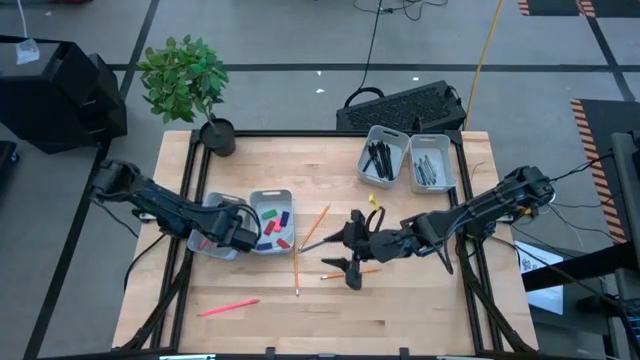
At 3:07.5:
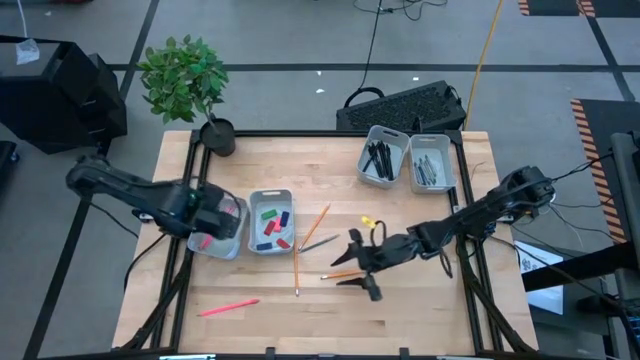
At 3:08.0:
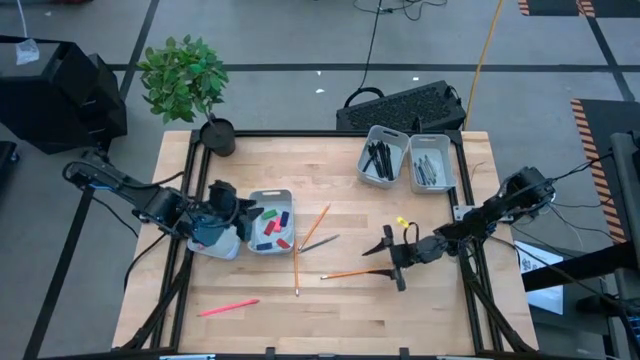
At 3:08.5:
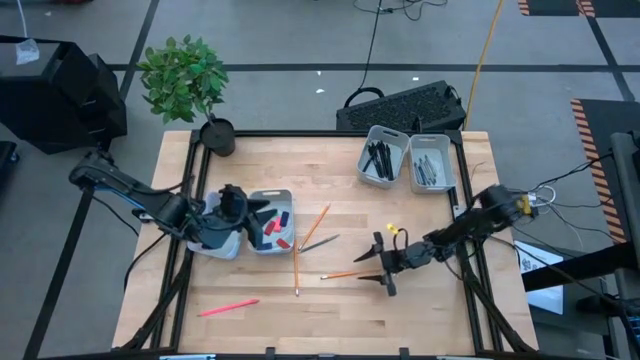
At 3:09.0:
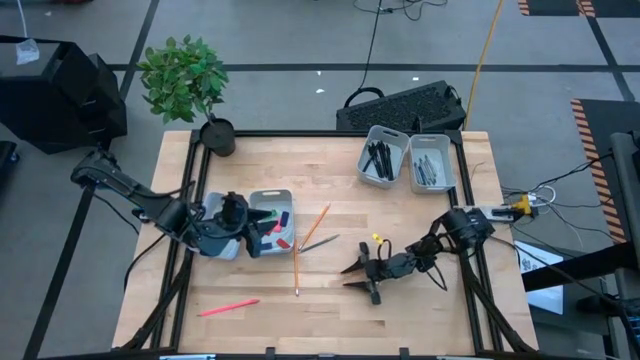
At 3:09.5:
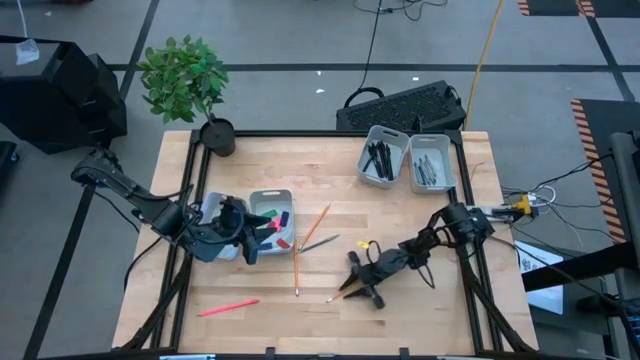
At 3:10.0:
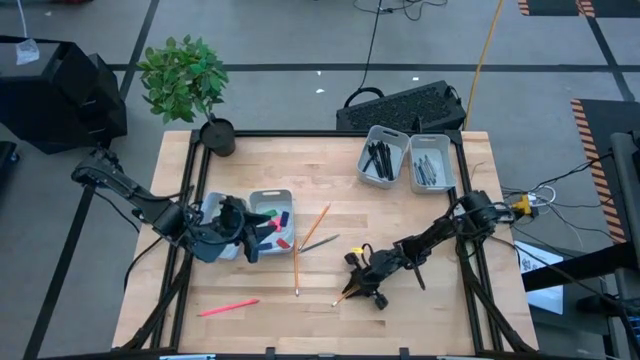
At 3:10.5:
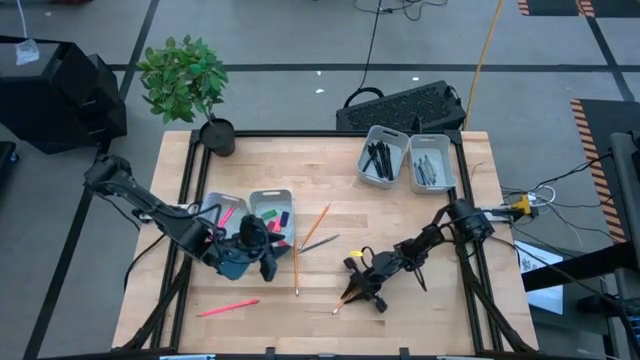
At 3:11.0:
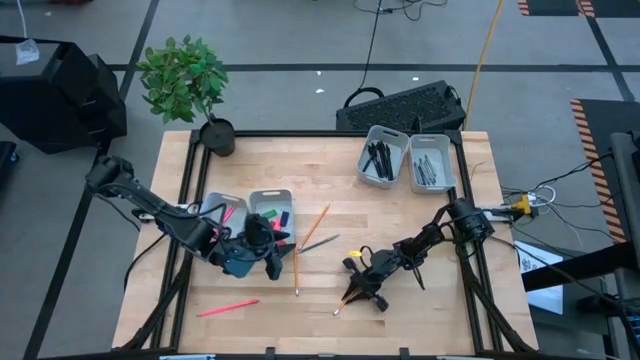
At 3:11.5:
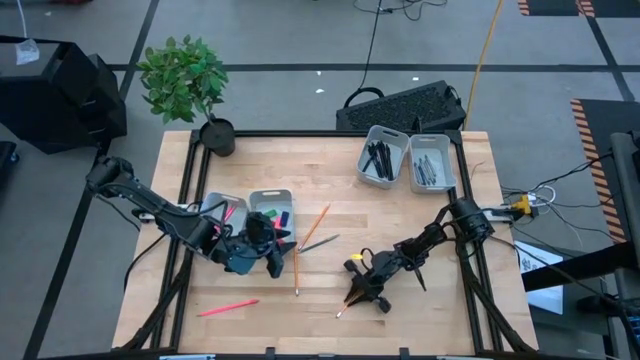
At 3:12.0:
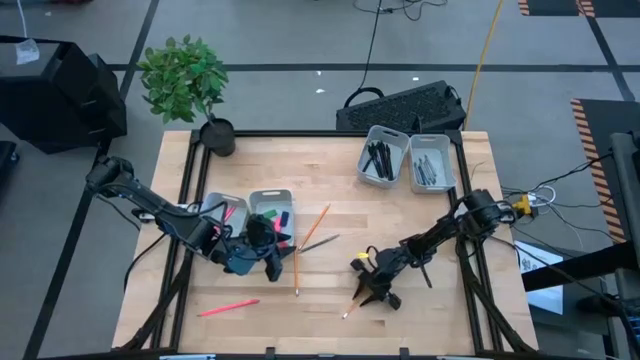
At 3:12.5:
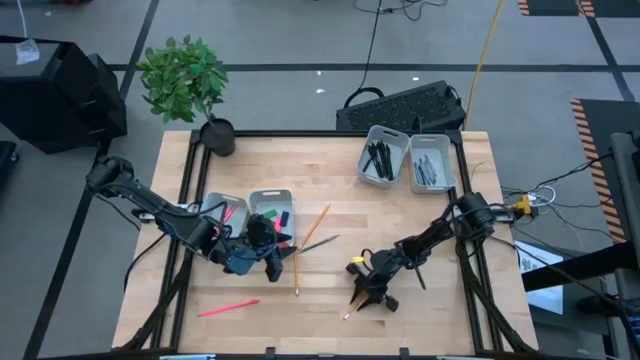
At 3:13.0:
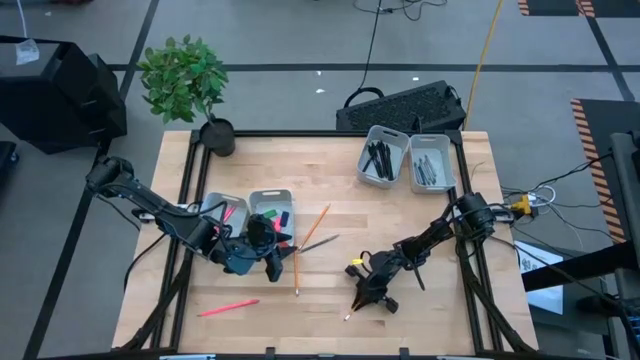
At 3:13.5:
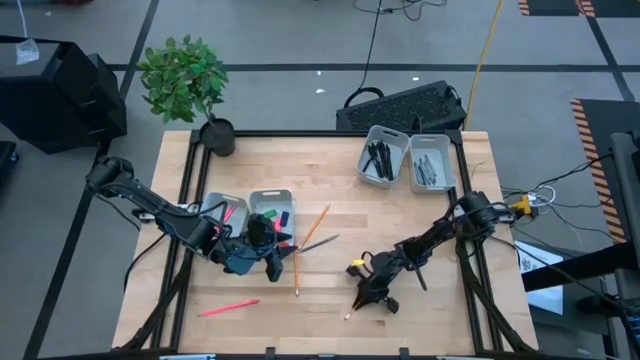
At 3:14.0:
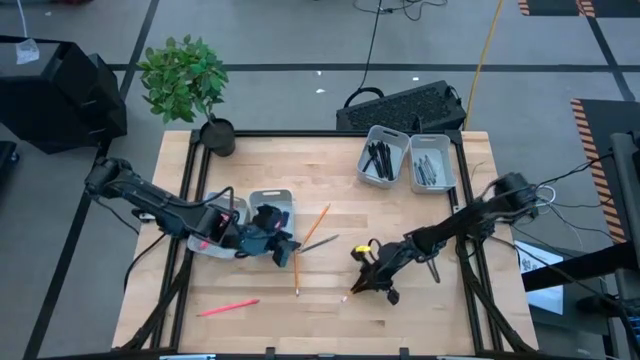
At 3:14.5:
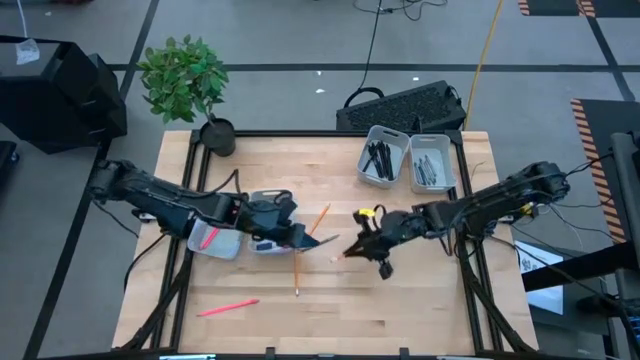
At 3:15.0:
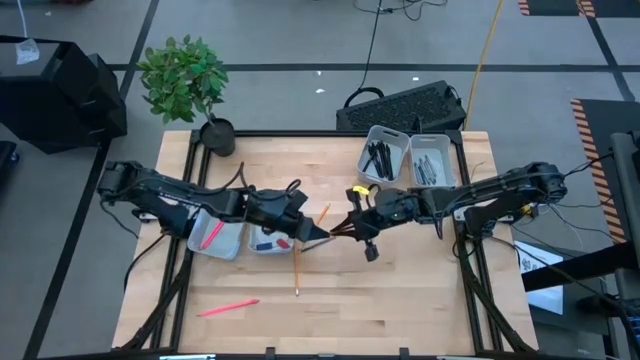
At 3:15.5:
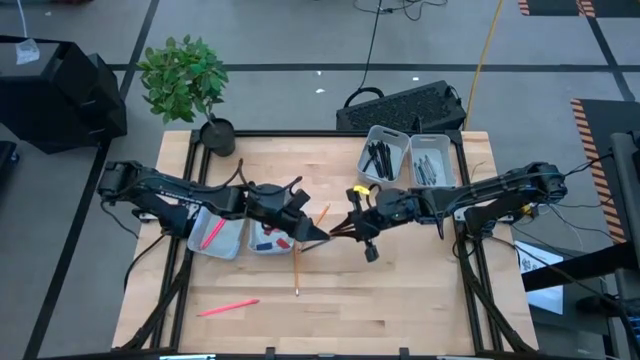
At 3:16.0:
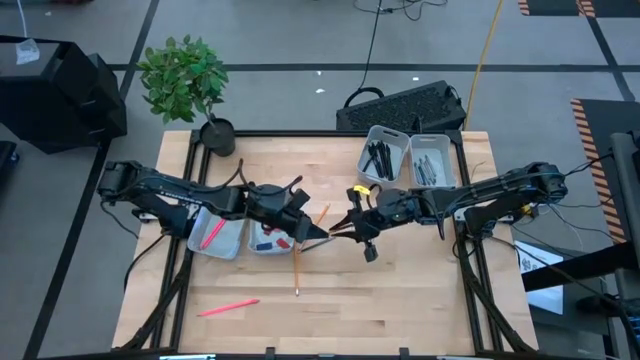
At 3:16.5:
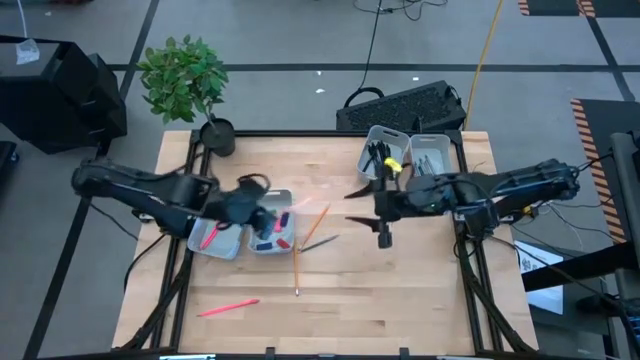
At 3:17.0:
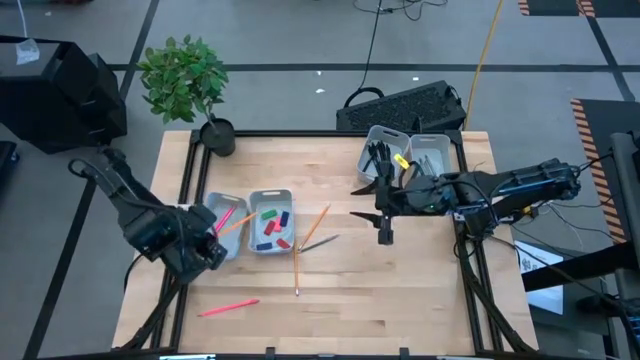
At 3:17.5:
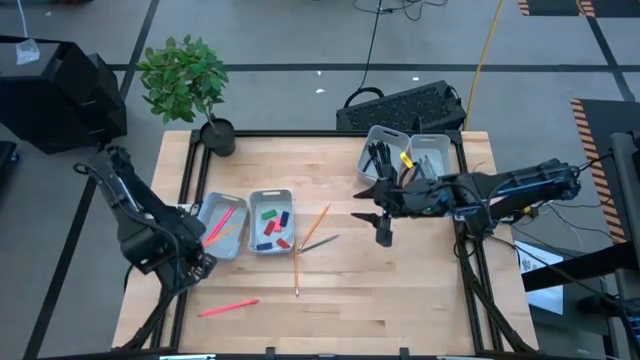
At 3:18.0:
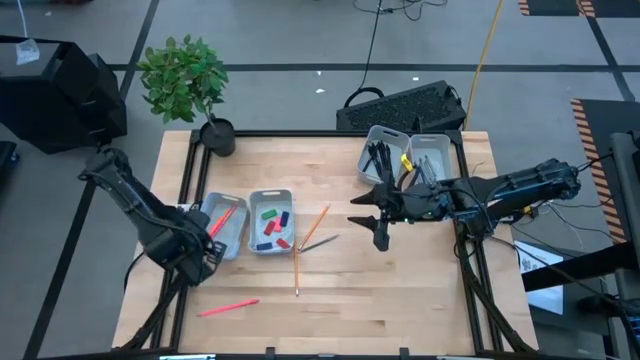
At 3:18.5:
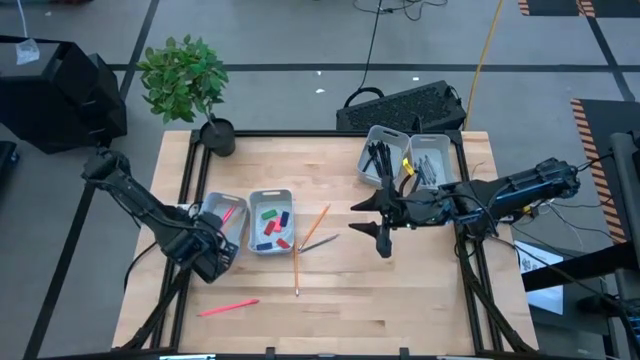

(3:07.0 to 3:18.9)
Task: Sort crayons/erasers/pens/pencils in bins
Put the yellow pencil into the bottom left gray bin

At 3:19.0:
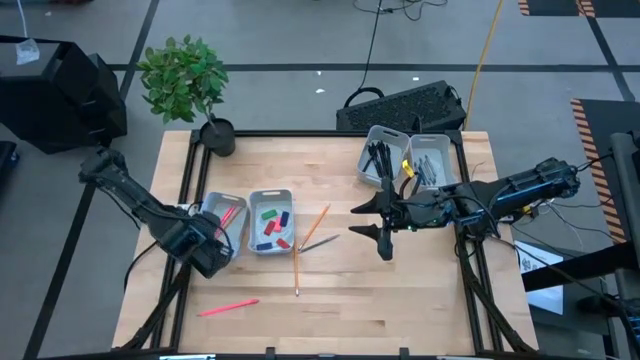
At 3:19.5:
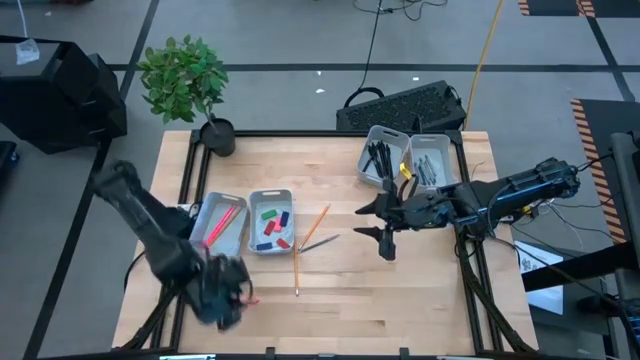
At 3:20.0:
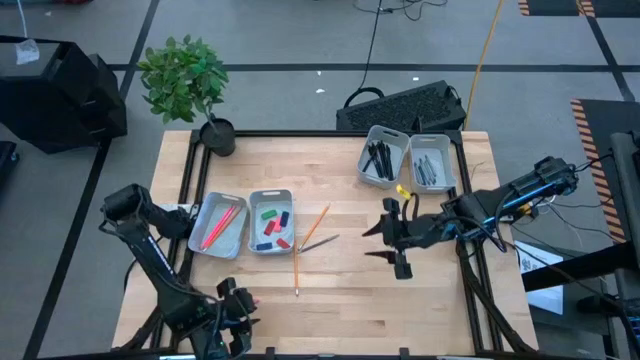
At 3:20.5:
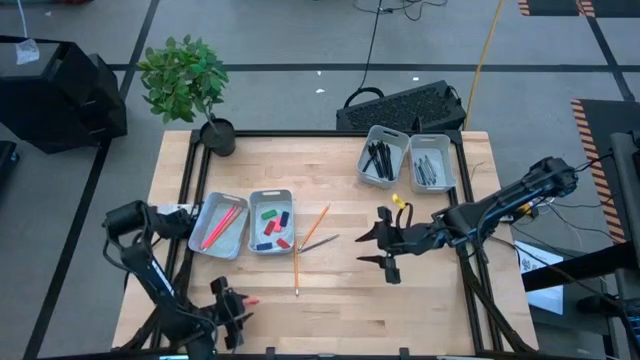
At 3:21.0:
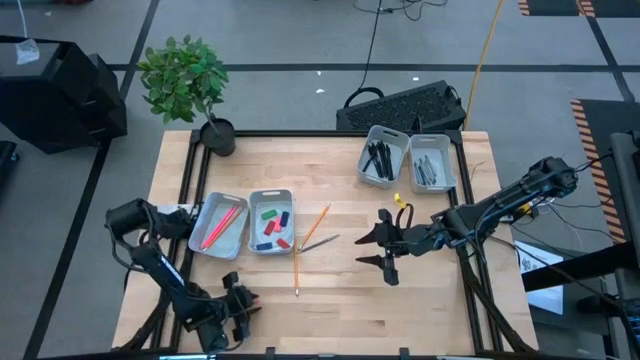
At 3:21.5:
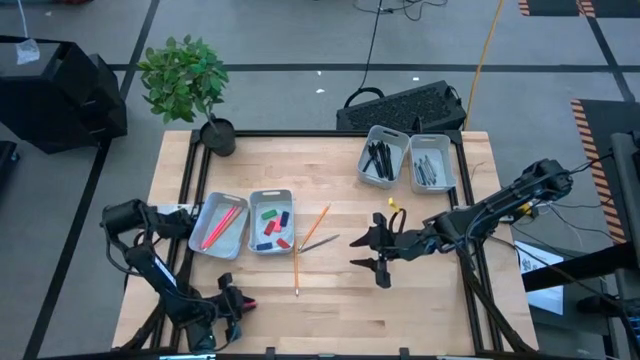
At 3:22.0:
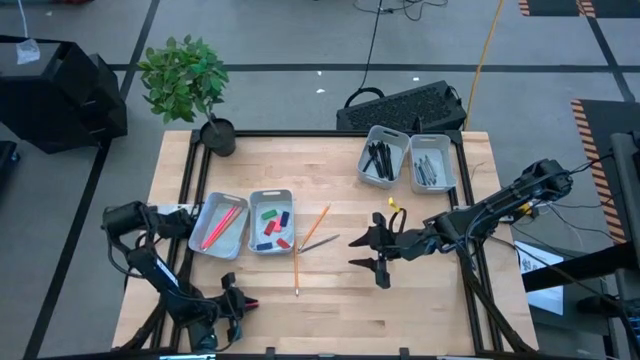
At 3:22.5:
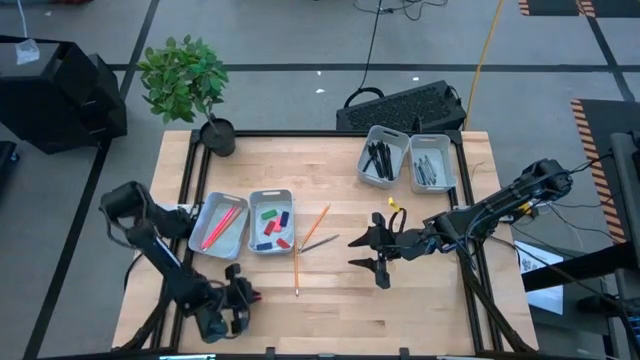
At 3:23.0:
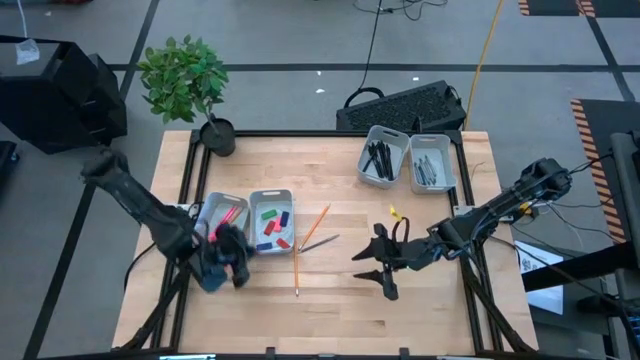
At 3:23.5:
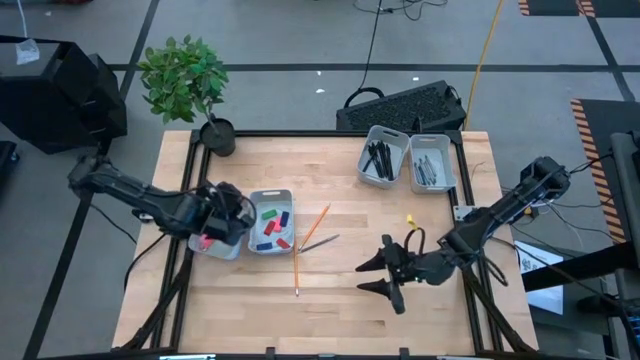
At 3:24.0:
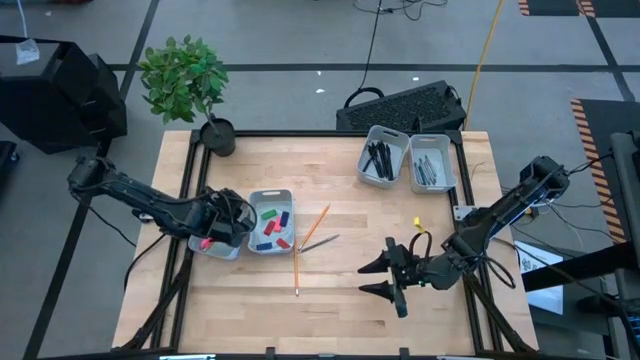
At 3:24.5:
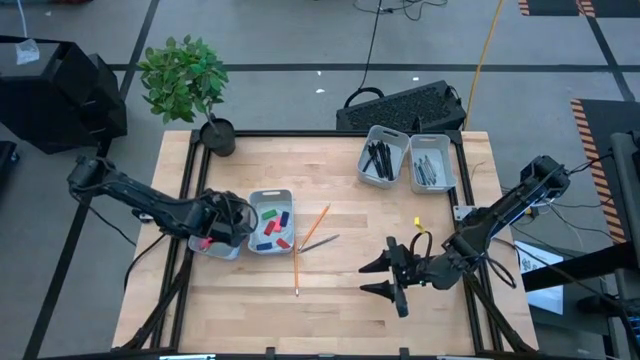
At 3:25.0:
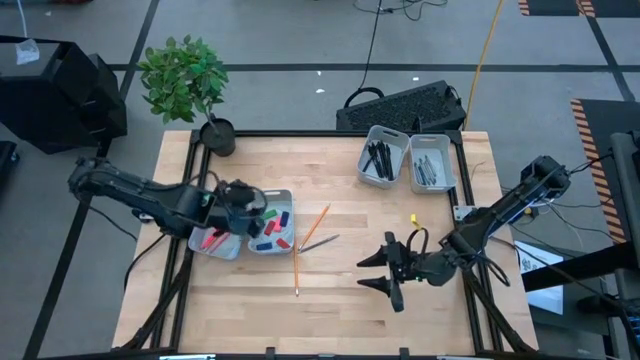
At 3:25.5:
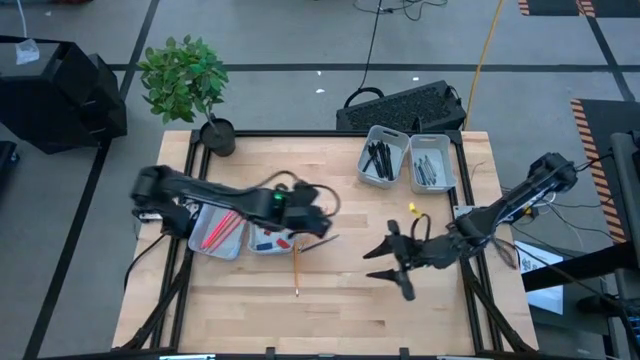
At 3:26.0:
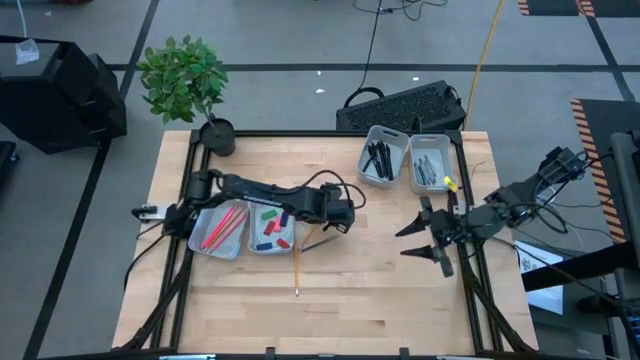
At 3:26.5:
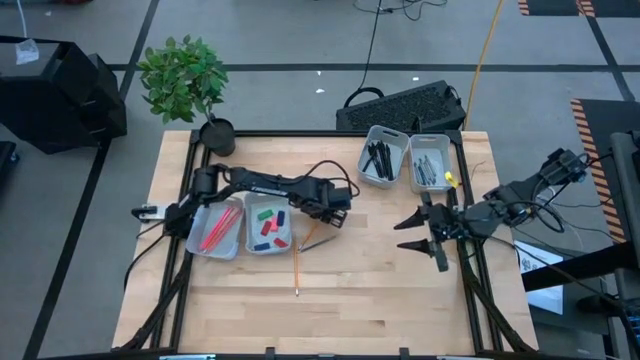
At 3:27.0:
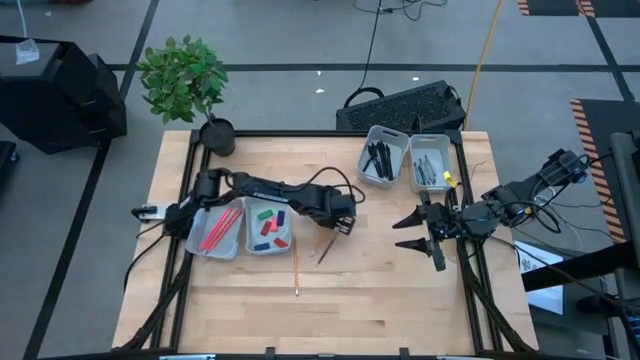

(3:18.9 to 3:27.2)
Put the pink pencil into the bottom left gray bin

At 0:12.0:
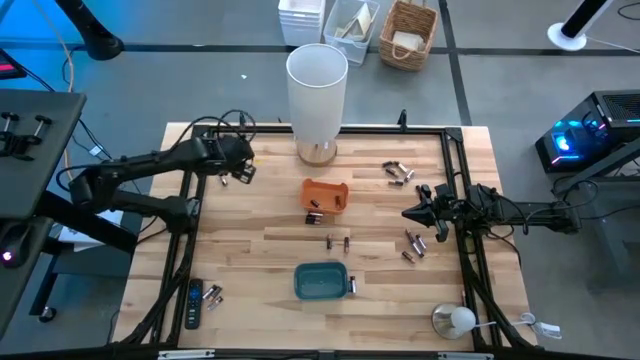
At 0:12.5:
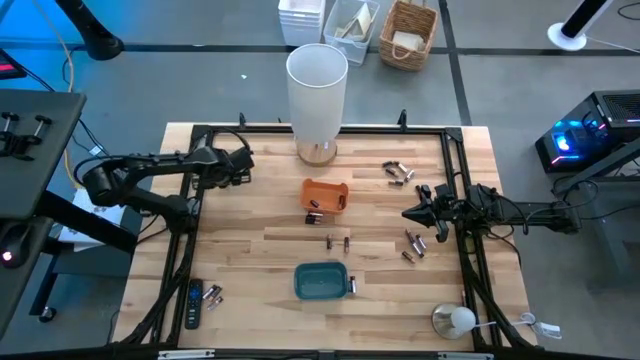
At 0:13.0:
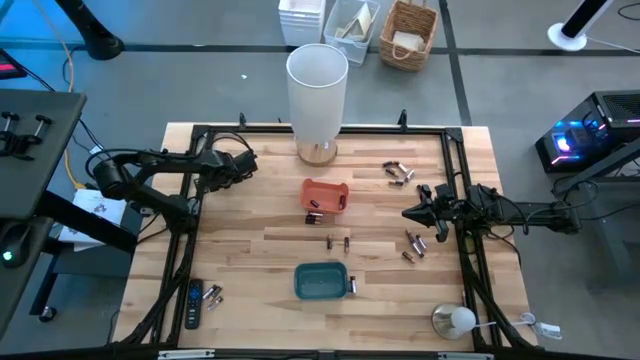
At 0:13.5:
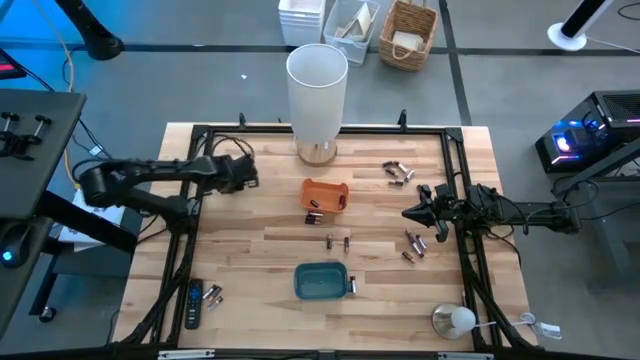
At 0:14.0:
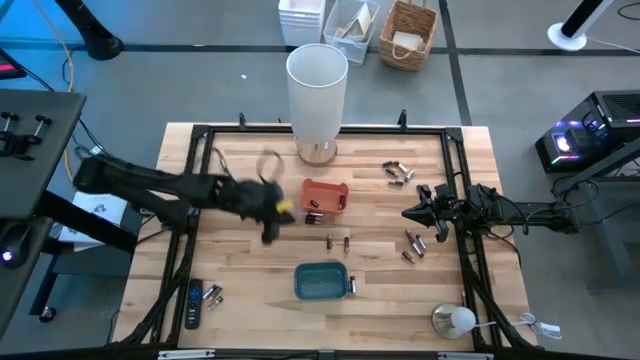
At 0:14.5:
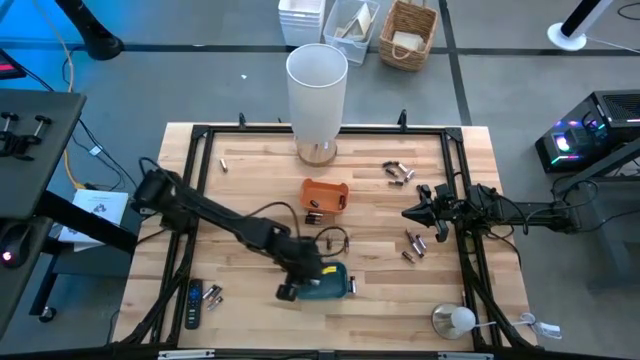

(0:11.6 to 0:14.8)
Task: Sort batteries
Put the silver battery into the blue bin
